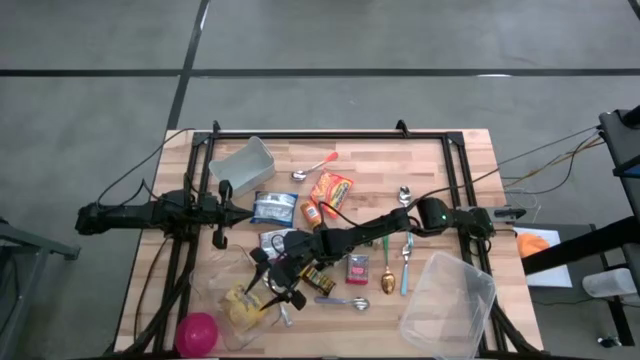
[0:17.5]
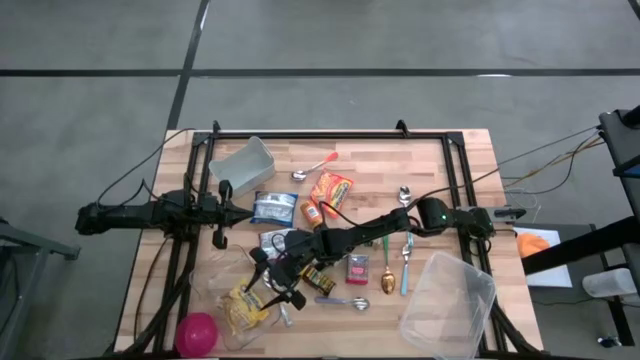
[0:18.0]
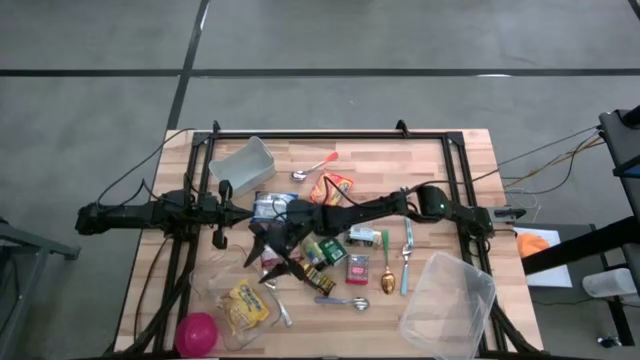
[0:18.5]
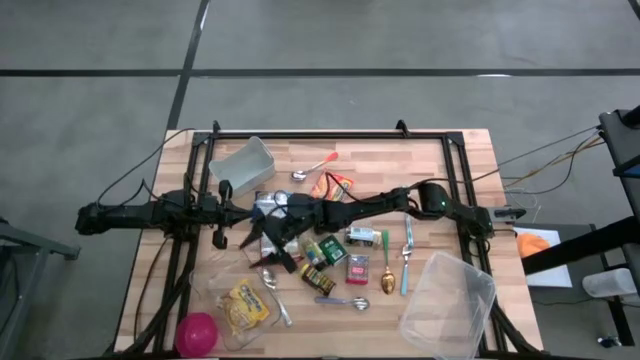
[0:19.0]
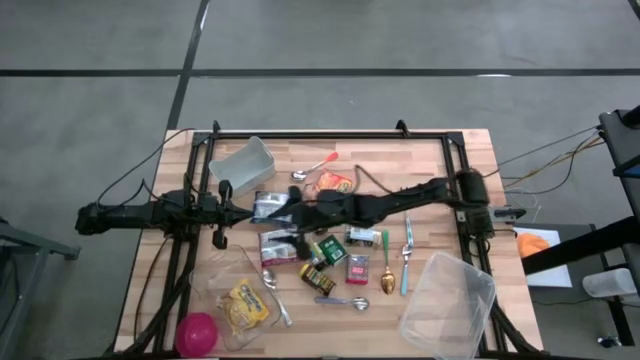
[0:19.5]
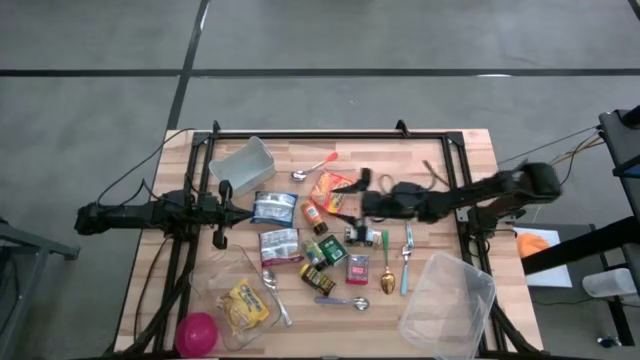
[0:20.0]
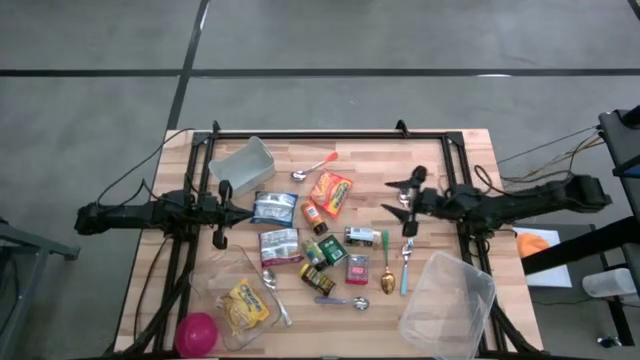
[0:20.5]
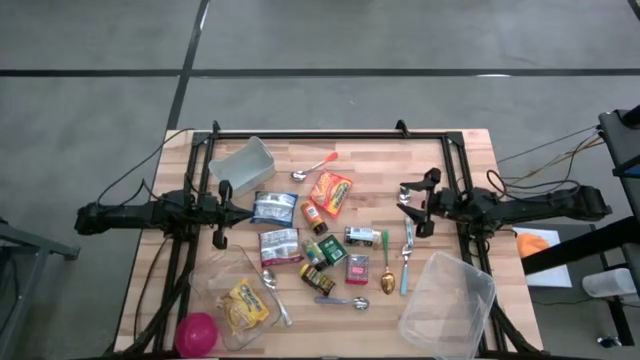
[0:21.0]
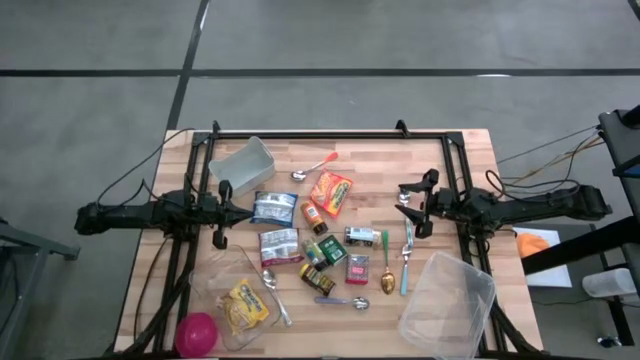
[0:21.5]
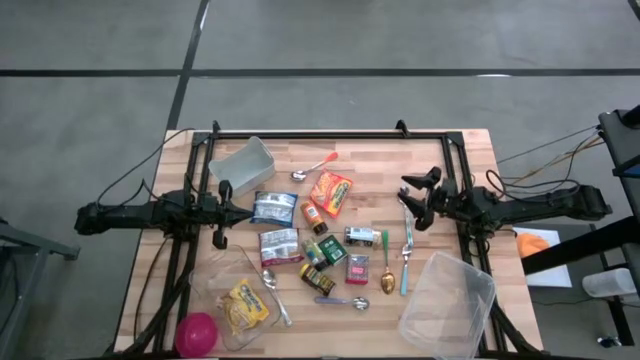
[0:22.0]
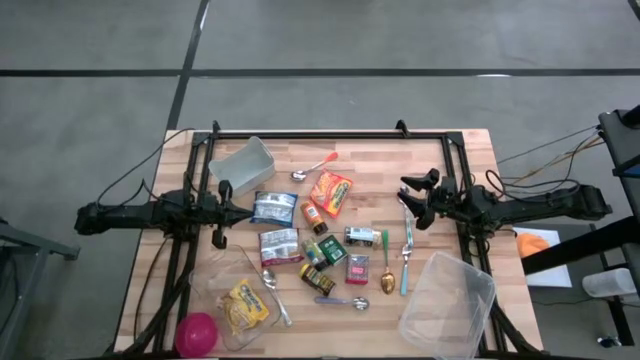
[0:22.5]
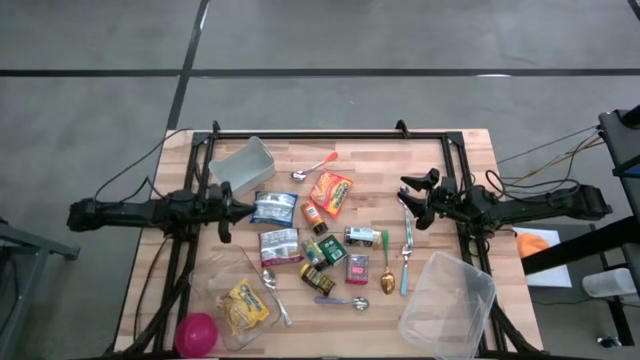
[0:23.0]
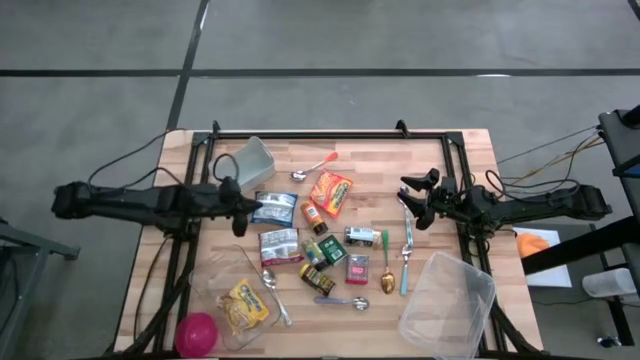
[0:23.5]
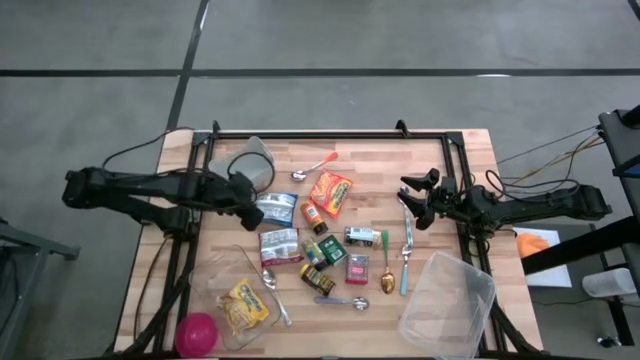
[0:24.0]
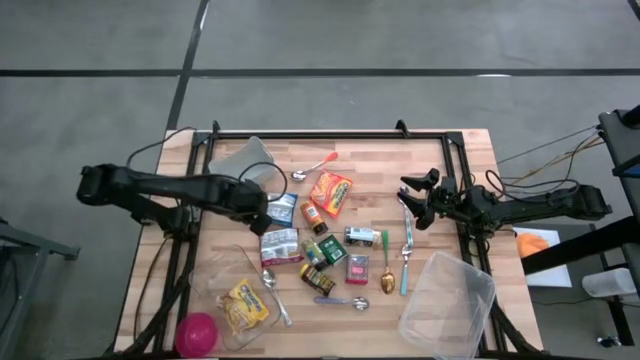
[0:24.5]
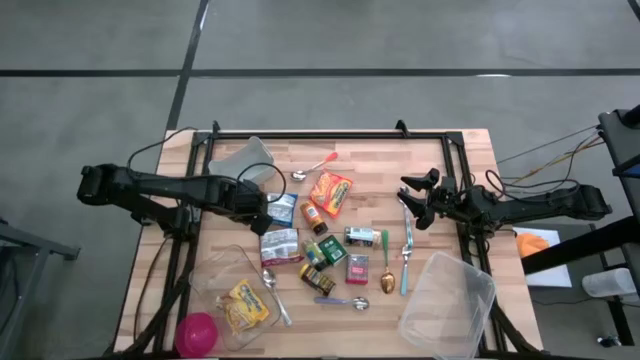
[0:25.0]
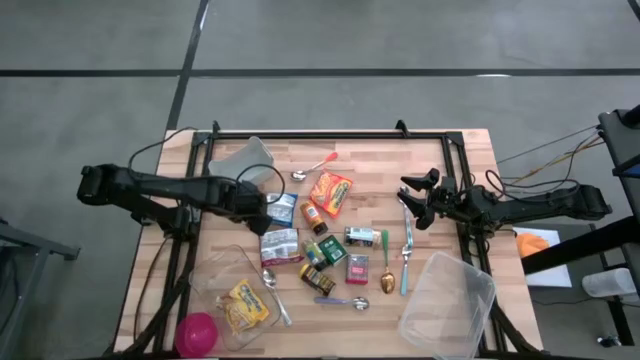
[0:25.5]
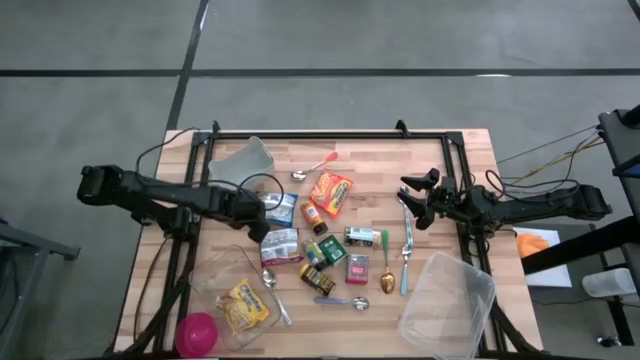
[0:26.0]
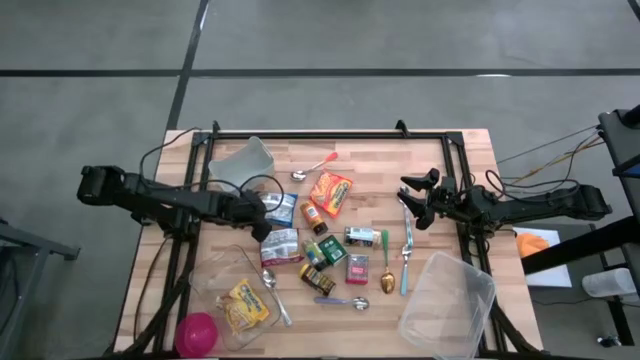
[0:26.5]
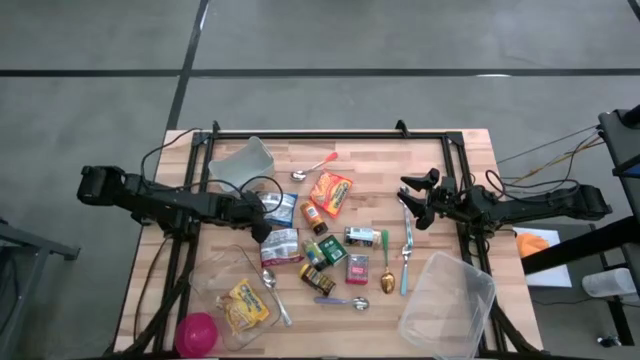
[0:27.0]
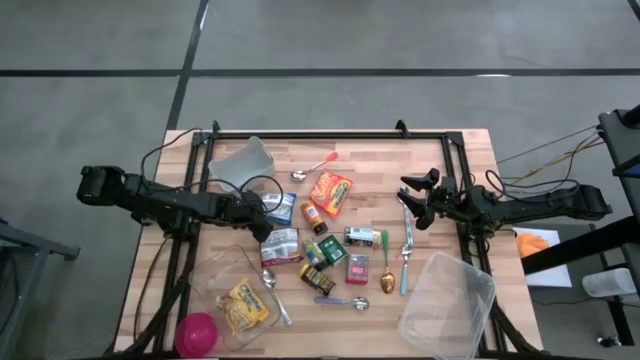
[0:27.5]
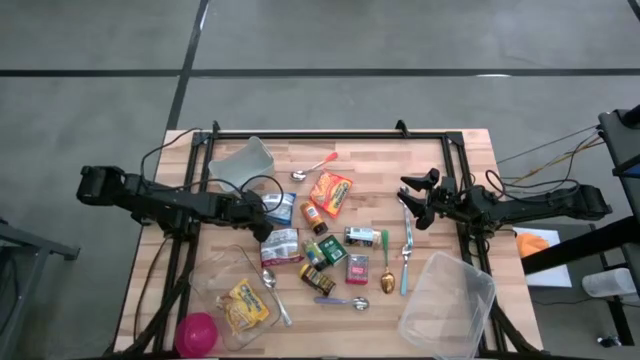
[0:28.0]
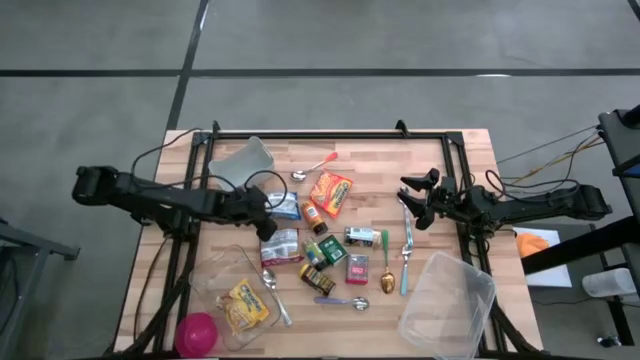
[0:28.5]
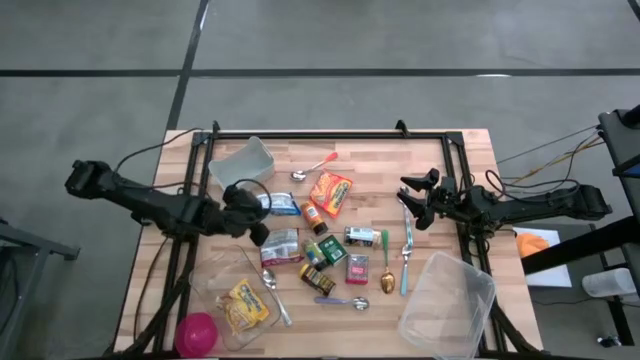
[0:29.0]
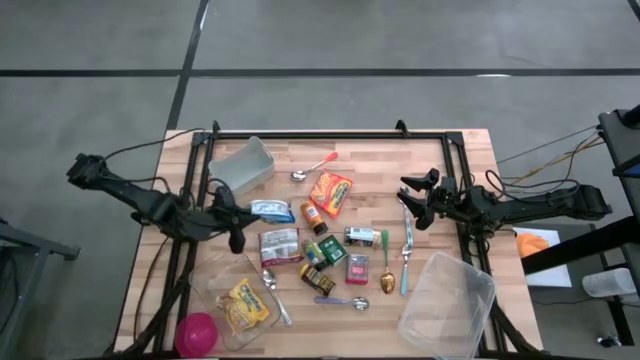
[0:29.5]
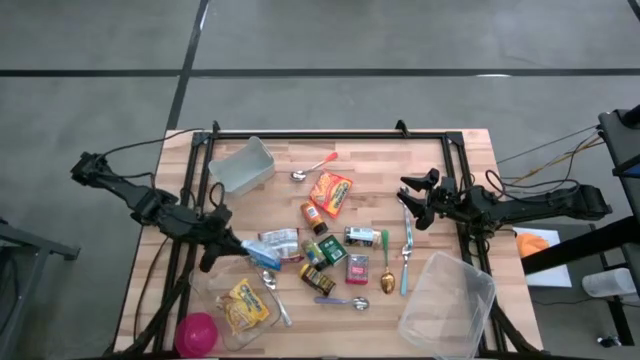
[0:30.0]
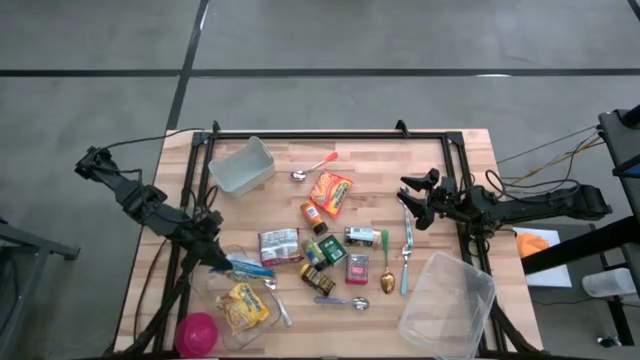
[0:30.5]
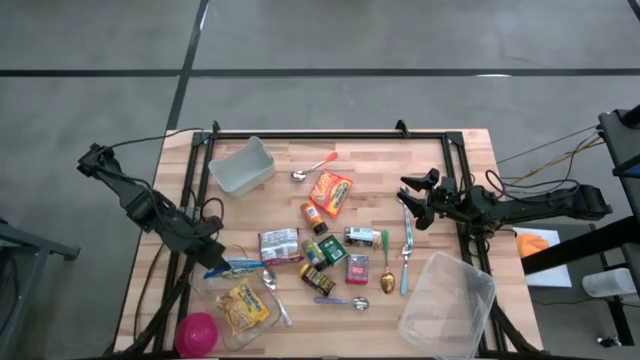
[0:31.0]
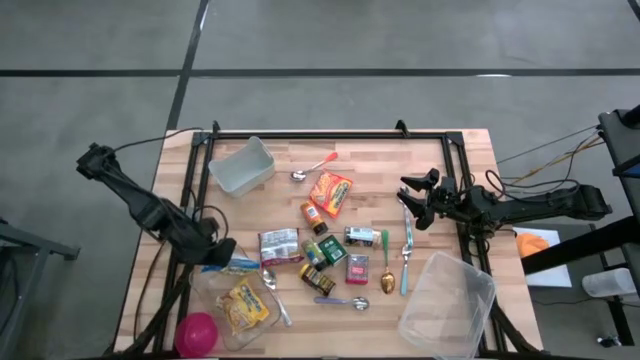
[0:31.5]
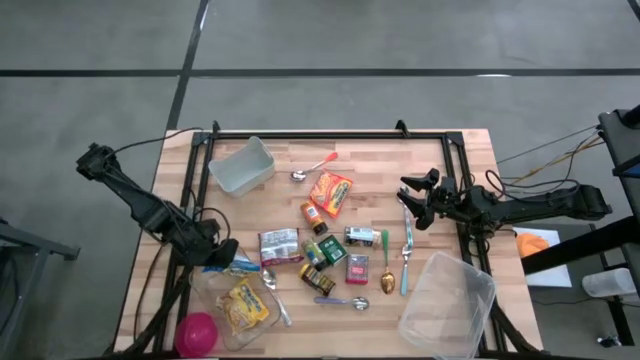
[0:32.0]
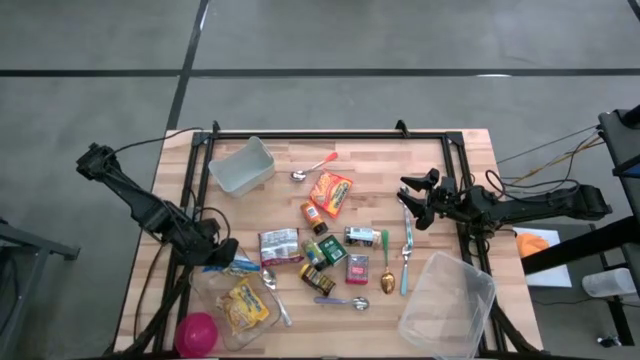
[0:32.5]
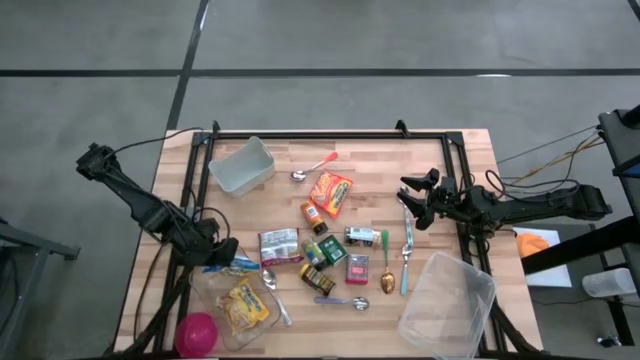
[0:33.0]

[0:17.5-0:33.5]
Put the blue noodle pack into the transparent bin
